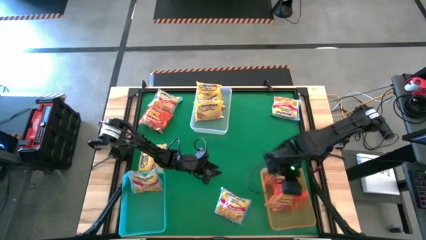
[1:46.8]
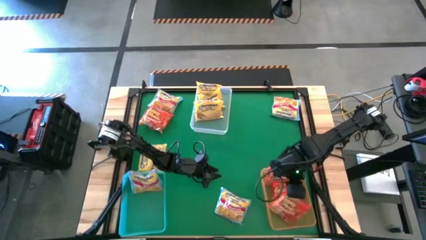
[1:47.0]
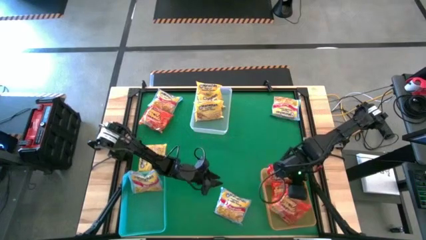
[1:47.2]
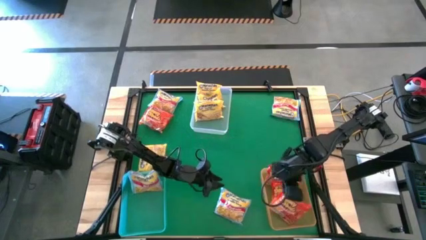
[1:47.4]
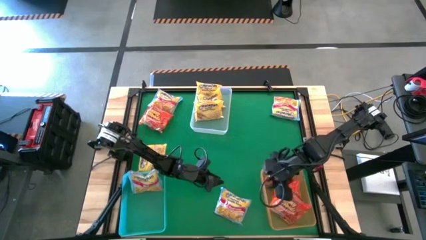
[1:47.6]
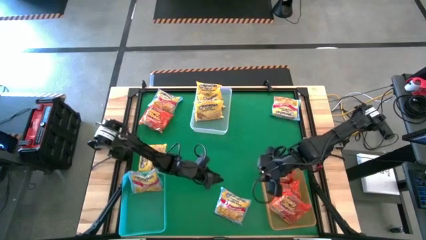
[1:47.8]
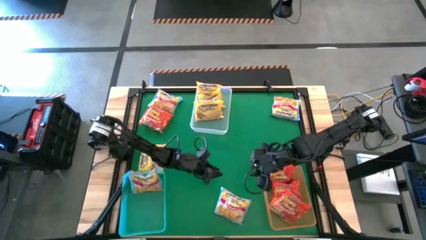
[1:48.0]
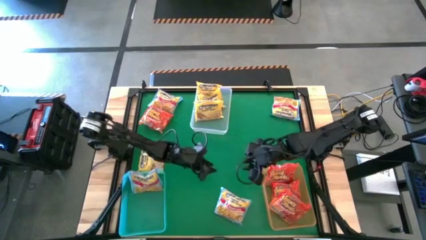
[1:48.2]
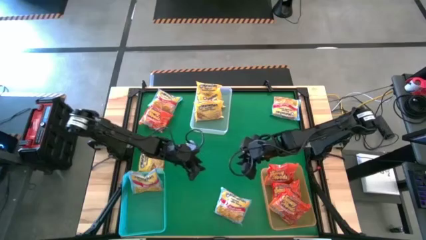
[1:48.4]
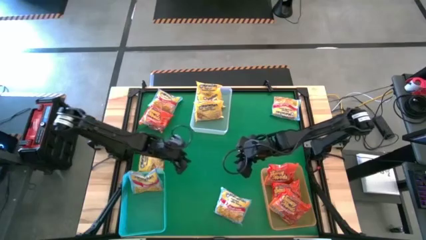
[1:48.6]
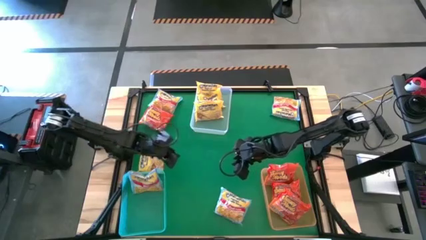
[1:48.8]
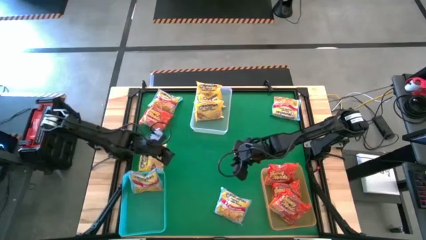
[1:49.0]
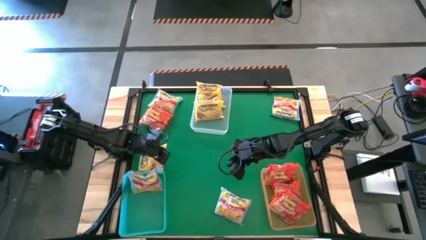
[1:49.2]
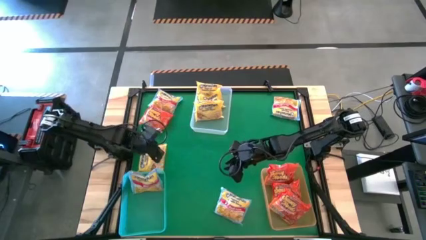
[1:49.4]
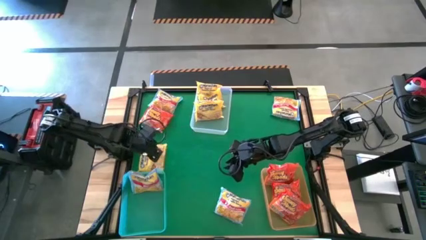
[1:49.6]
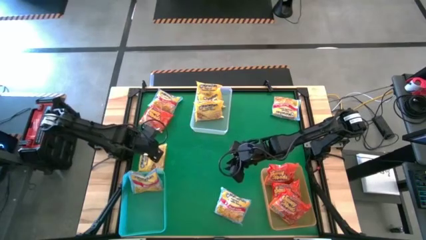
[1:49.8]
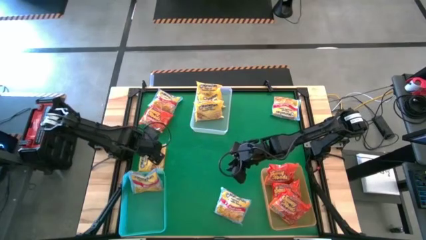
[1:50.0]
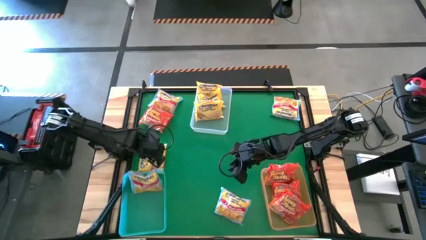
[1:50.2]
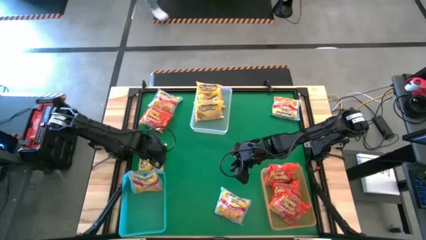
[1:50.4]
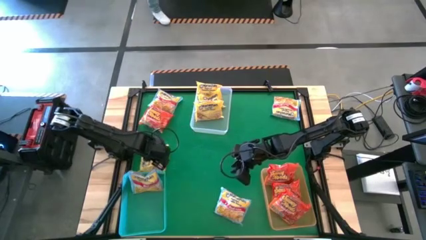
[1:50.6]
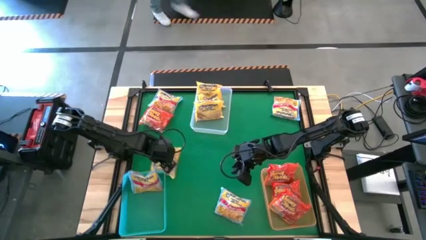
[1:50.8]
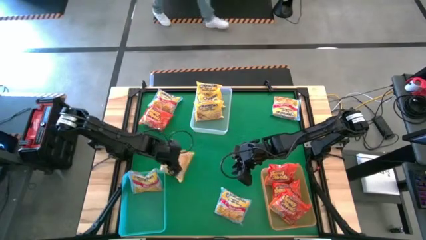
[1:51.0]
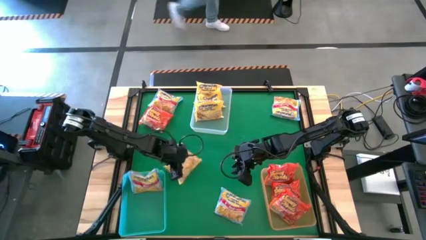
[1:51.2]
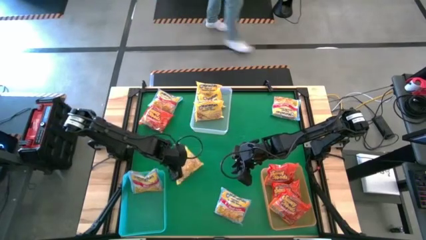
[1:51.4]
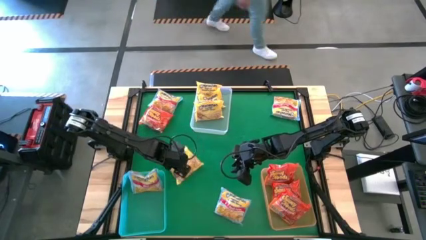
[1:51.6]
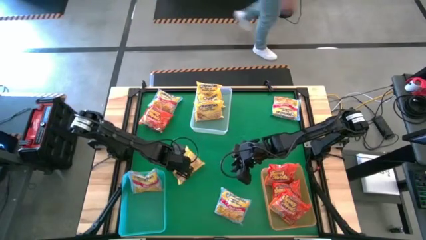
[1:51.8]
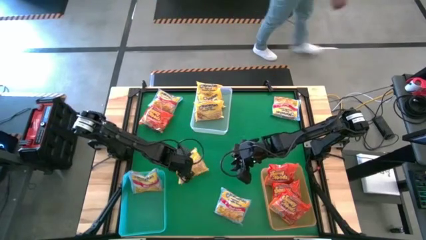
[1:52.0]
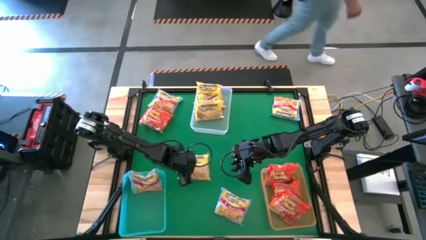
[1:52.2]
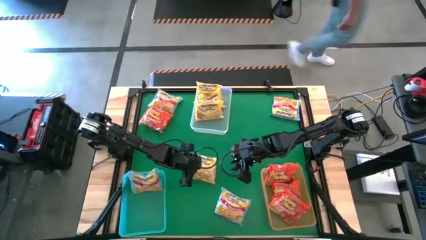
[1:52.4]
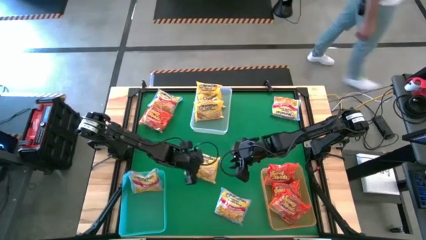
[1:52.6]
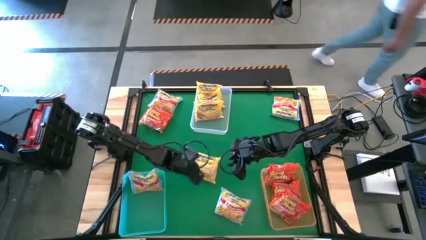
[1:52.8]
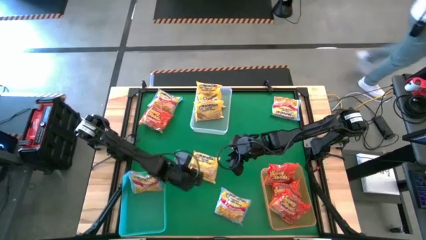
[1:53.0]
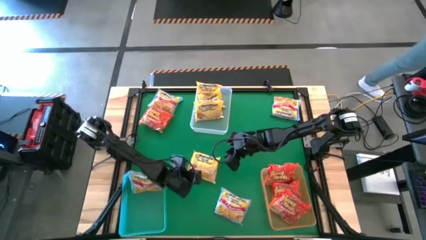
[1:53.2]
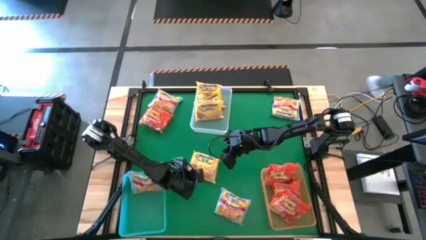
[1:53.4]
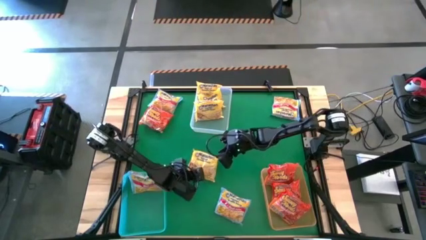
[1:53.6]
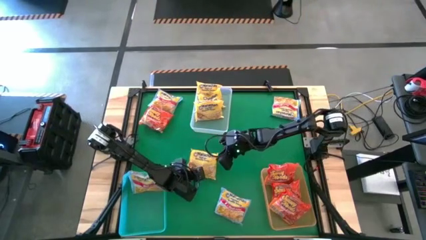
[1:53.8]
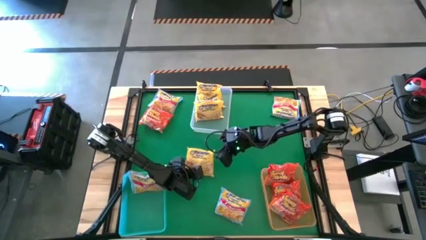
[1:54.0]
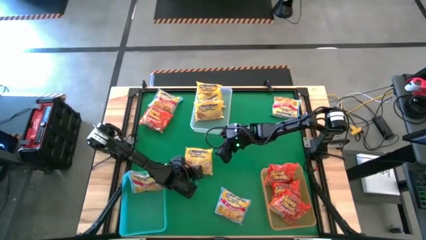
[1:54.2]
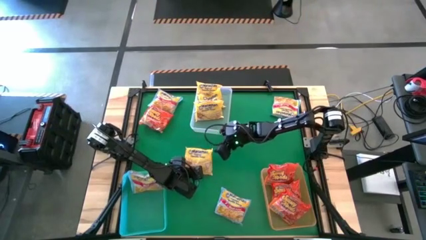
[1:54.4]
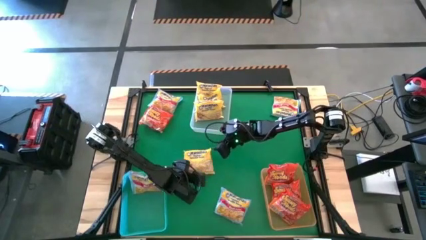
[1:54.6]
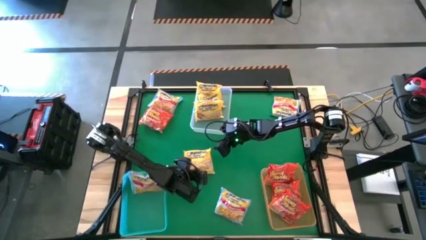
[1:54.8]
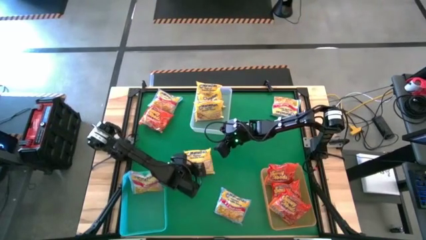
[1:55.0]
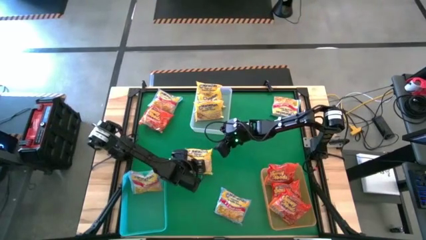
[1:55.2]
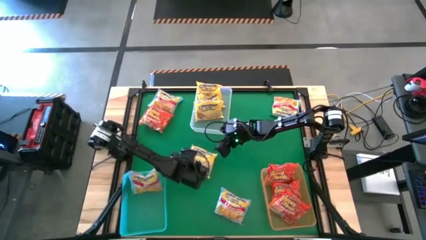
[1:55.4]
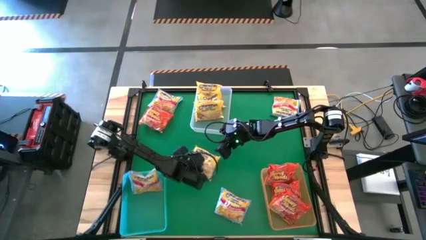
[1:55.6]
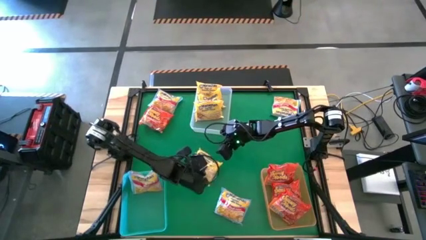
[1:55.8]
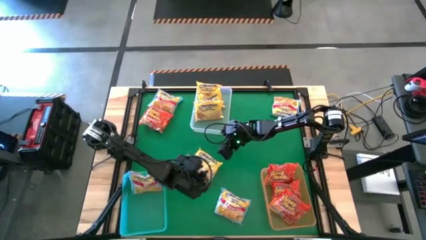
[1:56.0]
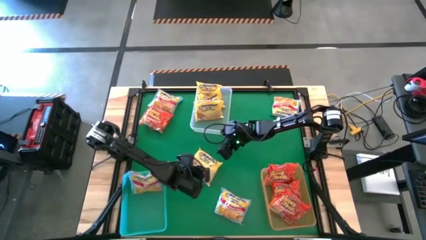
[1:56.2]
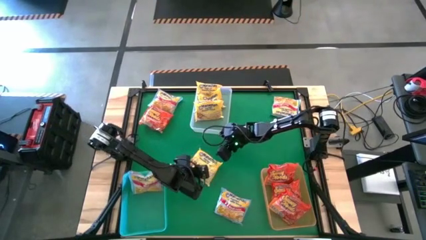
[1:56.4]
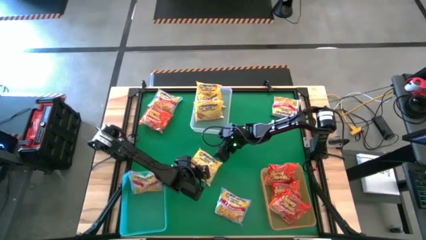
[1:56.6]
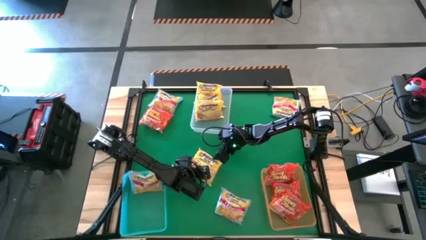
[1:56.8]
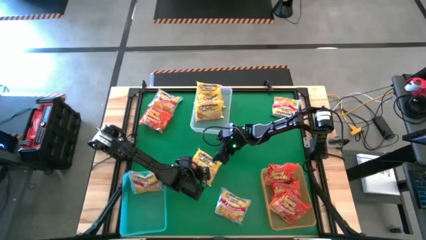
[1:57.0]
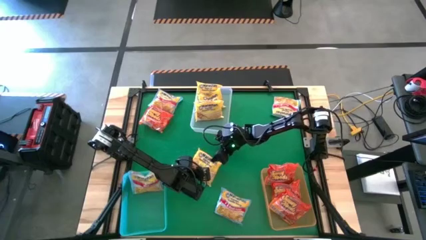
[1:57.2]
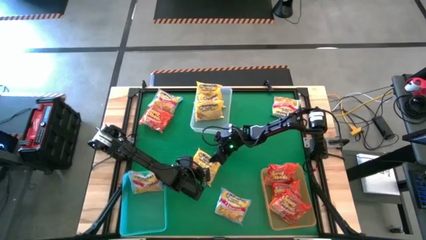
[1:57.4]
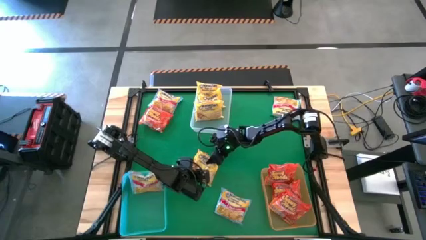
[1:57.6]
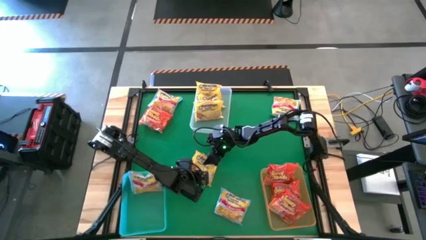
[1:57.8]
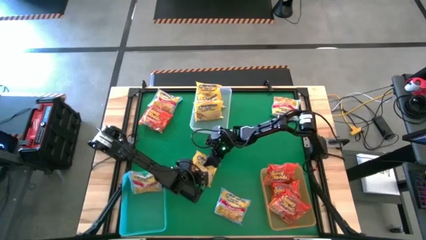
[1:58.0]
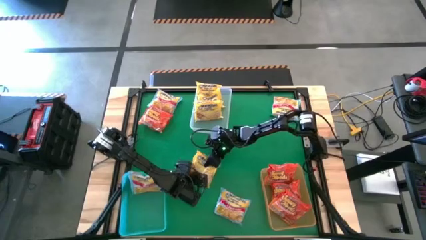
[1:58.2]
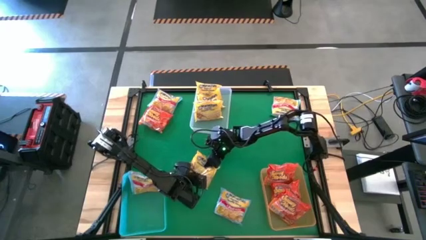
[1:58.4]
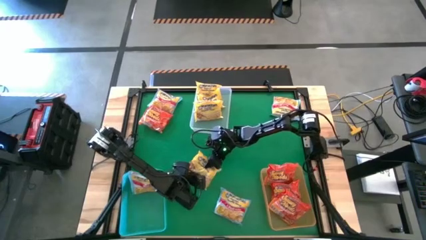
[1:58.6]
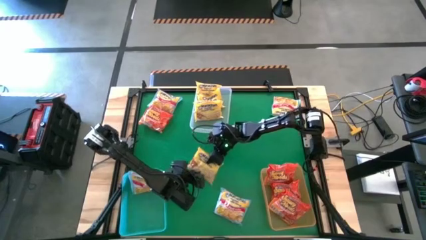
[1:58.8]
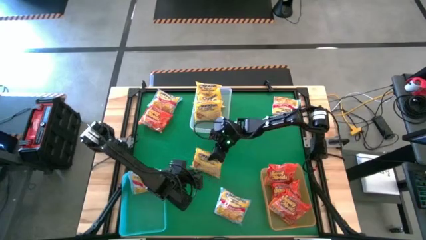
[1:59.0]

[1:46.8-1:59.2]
Task: Sort Maruchan noodles
Put the yellow noodle pack into the transparent bin

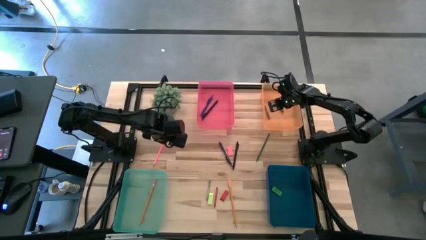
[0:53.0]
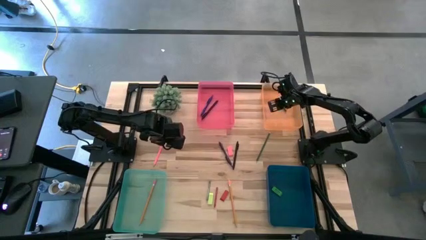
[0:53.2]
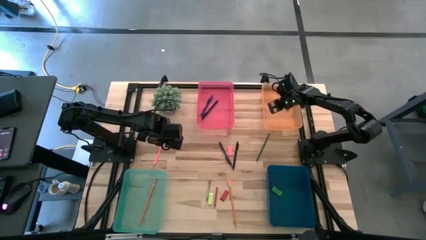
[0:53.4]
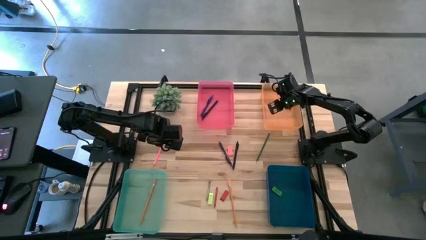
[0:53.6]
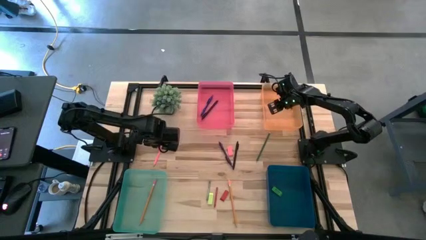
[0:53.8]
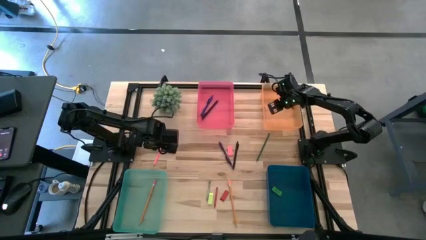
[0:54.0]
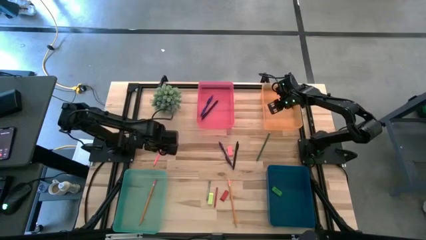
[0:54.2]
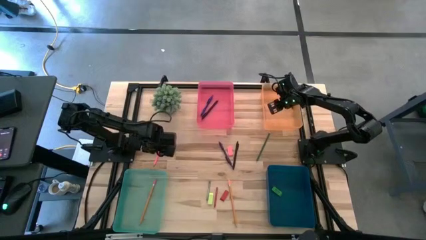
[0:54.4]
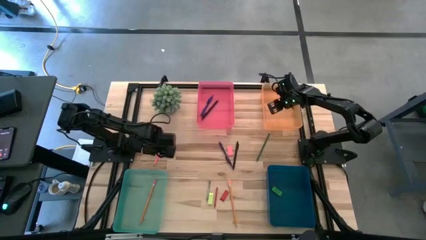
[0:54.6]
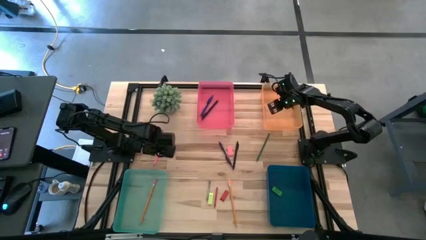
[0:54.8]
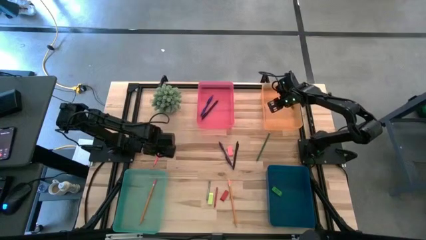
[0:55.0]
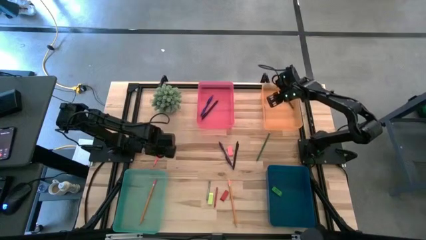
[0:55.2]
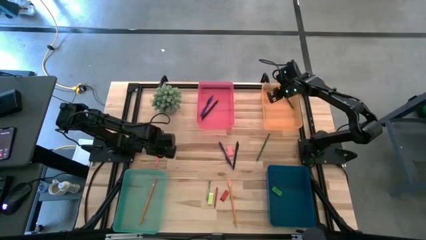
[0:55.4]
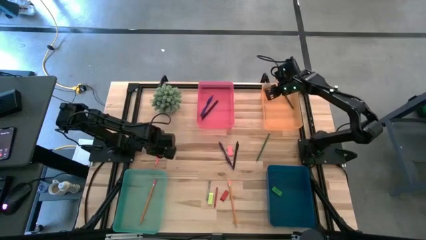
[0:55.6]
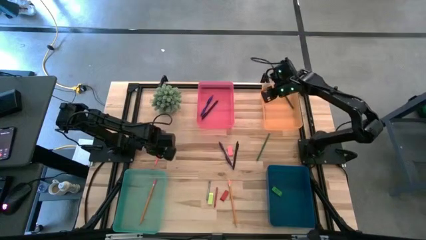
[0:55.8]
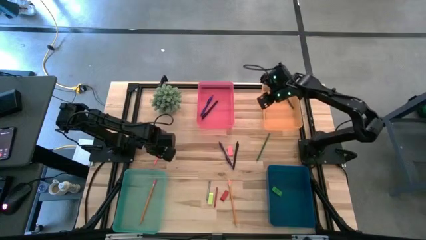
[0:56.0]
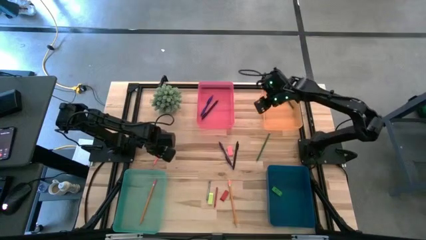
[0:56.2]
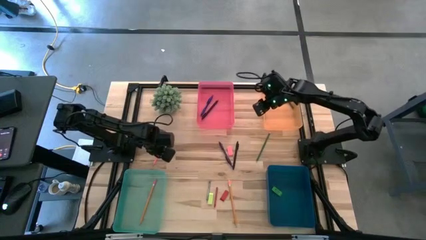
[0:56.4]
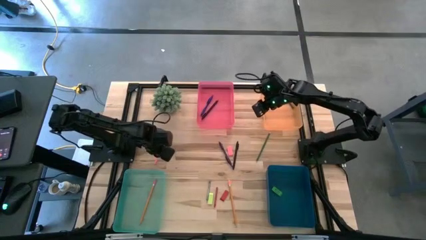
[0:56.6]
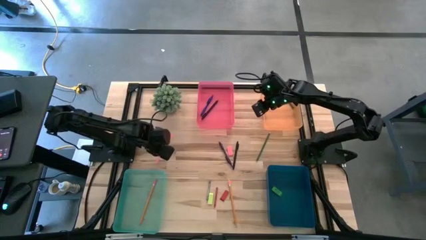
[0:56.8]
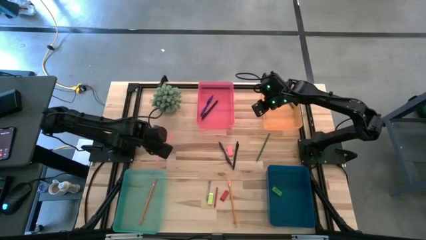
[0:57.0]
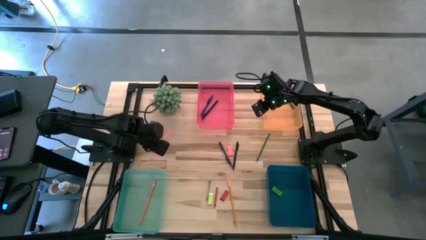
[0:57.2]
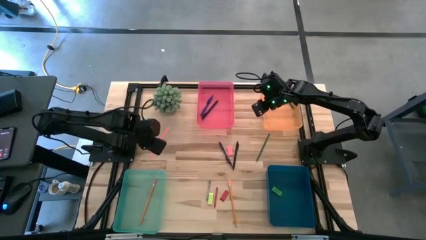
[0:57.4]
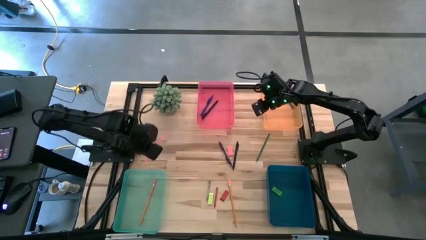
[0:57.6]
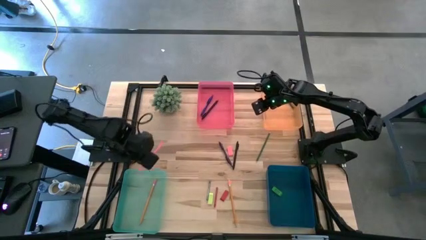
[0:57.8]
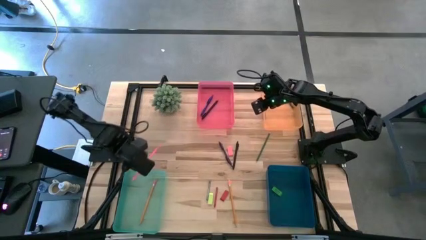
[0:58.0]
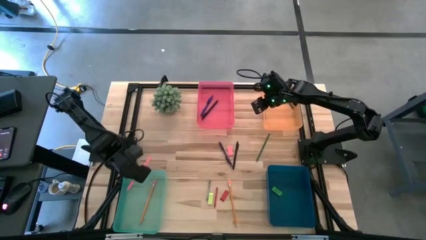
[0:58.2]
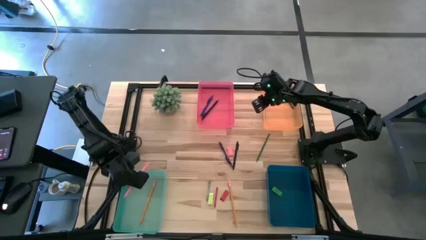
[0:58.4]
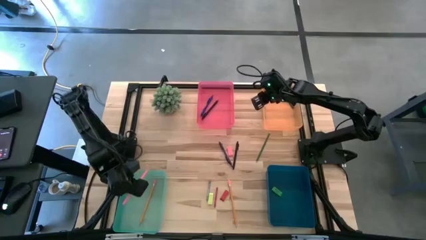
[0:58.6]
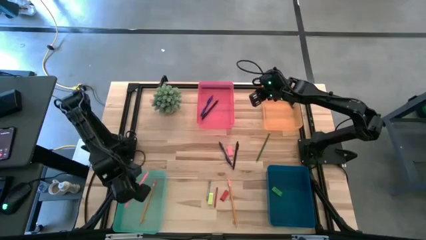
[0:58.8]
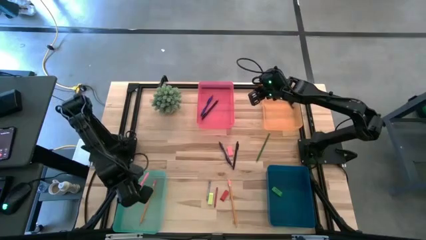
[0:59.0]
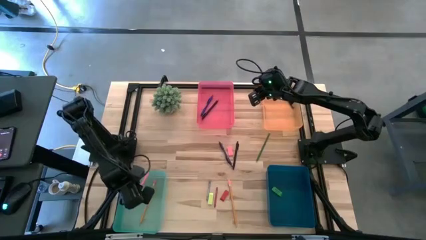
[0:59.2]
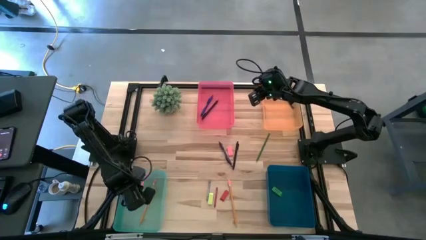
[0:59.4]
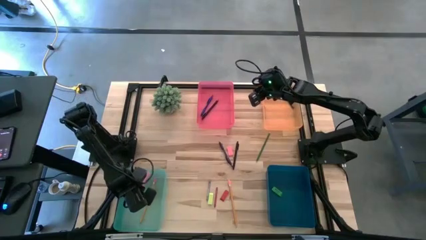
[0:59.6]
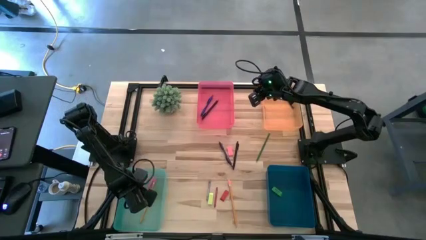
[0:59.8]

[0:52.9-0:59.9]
Task: Sort crayons/erasers/pens/pencils in bins
Put the pink pencil into the green bin
